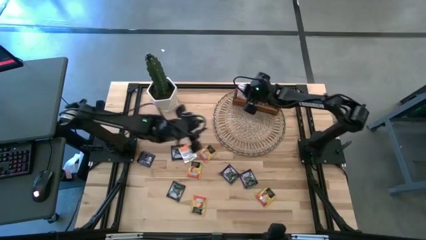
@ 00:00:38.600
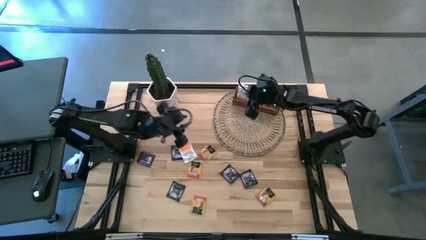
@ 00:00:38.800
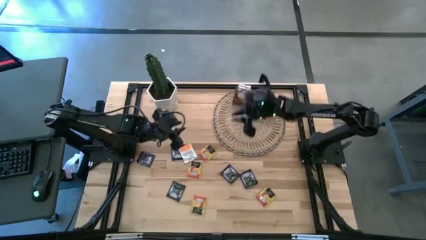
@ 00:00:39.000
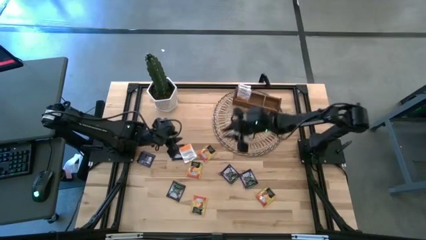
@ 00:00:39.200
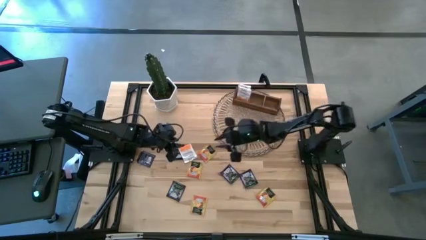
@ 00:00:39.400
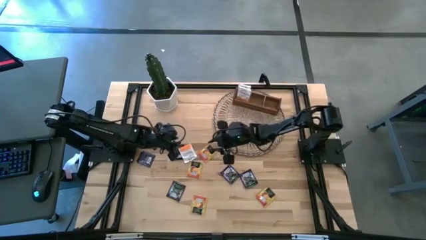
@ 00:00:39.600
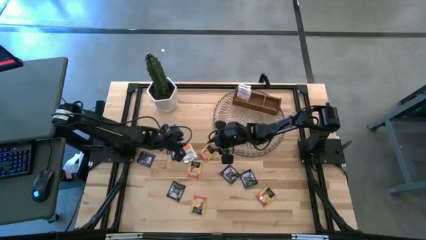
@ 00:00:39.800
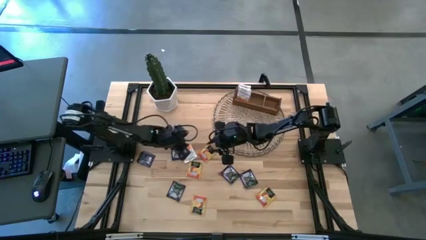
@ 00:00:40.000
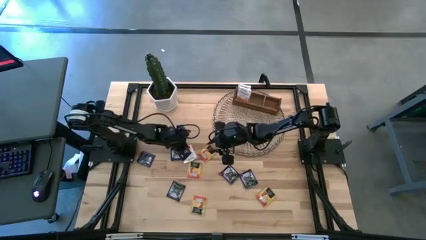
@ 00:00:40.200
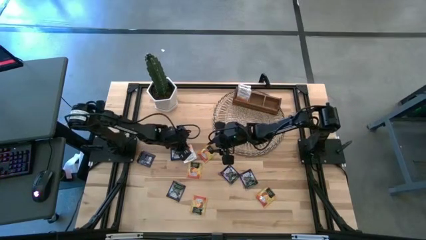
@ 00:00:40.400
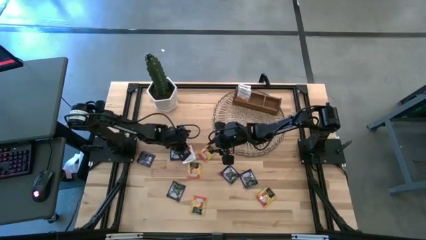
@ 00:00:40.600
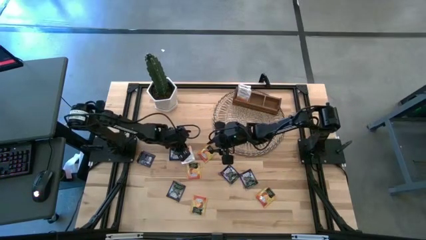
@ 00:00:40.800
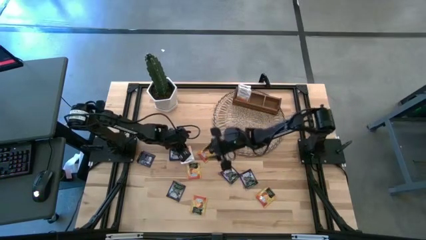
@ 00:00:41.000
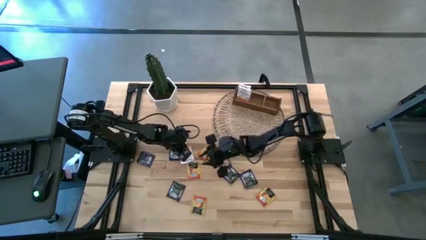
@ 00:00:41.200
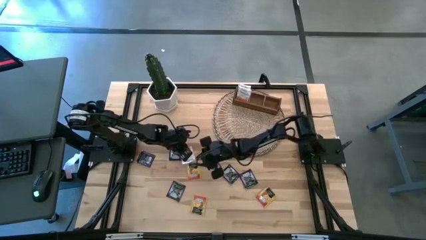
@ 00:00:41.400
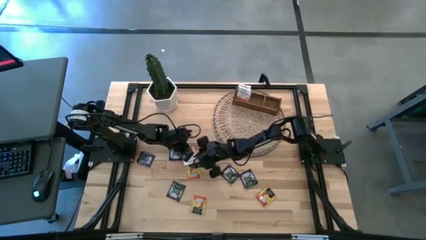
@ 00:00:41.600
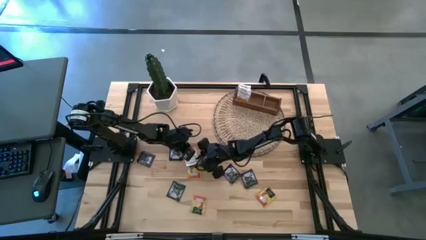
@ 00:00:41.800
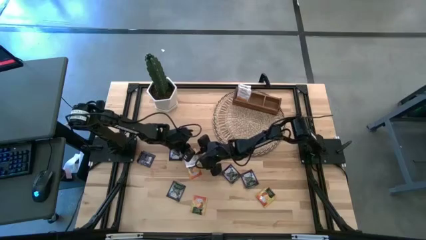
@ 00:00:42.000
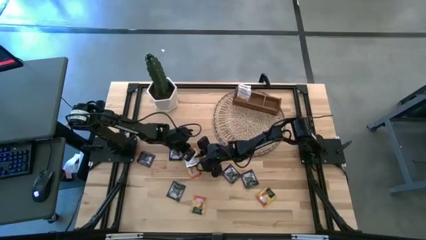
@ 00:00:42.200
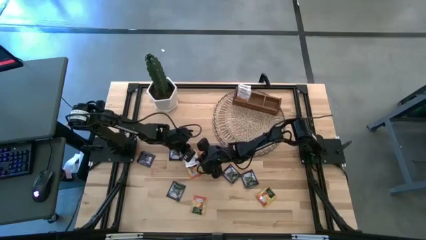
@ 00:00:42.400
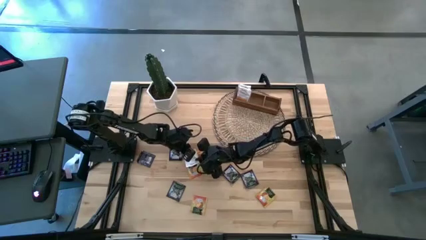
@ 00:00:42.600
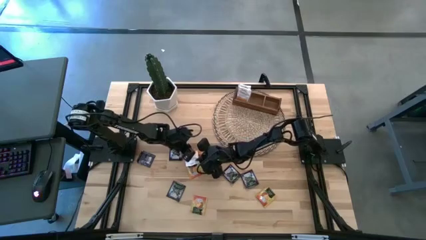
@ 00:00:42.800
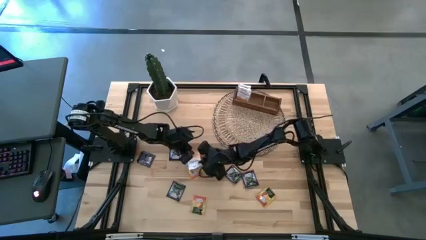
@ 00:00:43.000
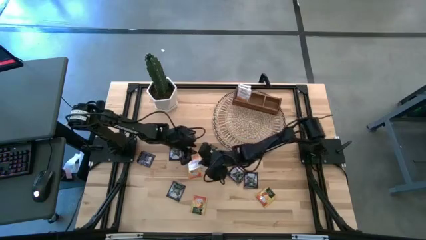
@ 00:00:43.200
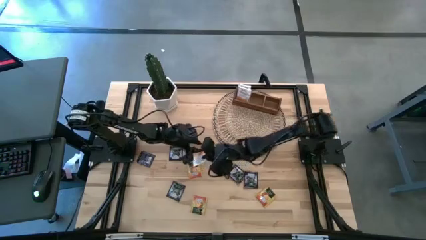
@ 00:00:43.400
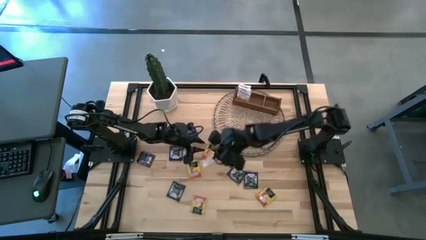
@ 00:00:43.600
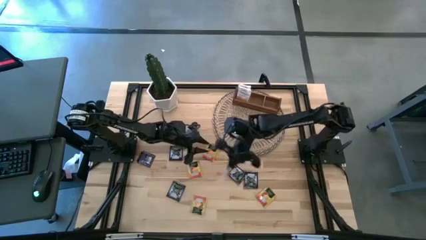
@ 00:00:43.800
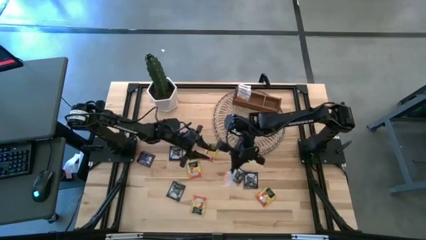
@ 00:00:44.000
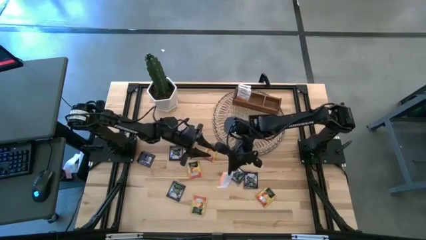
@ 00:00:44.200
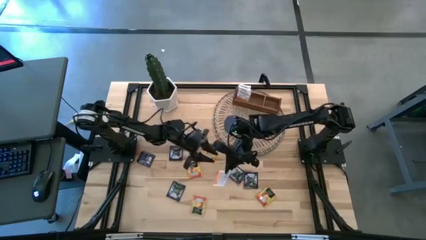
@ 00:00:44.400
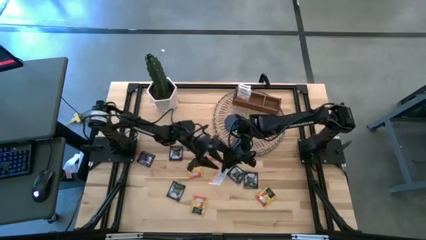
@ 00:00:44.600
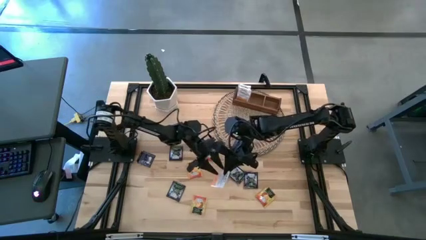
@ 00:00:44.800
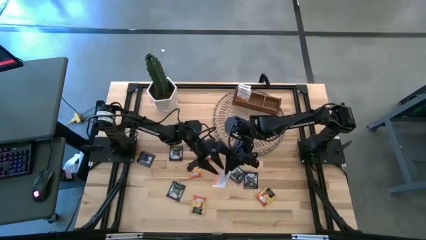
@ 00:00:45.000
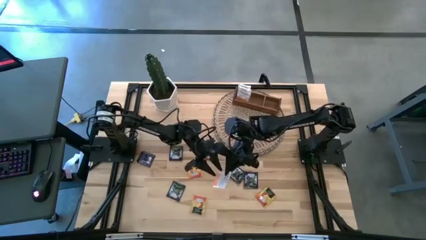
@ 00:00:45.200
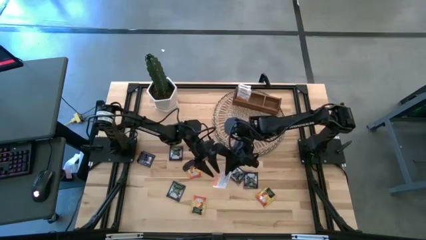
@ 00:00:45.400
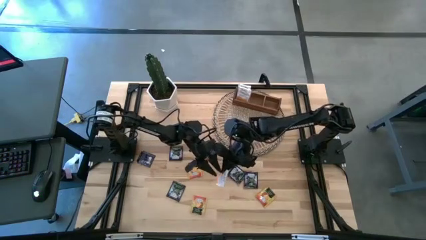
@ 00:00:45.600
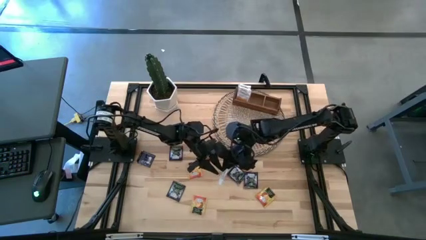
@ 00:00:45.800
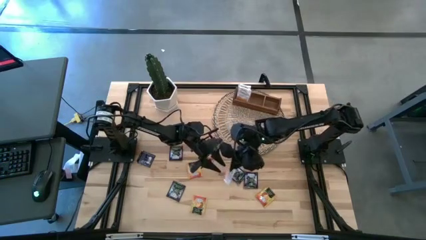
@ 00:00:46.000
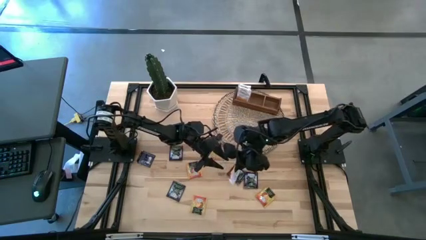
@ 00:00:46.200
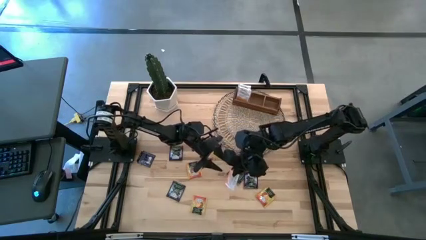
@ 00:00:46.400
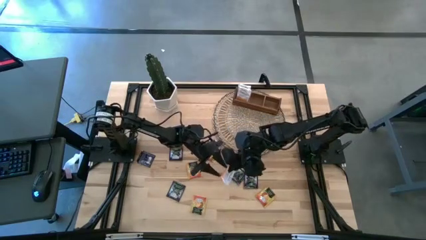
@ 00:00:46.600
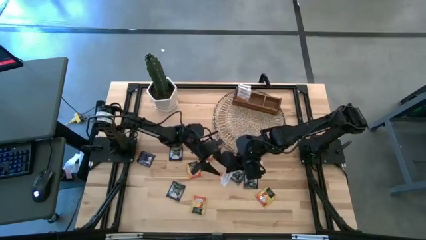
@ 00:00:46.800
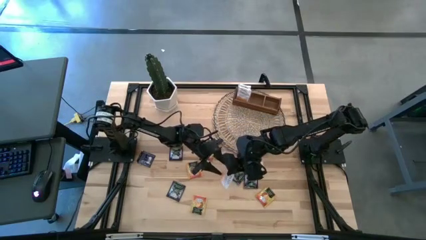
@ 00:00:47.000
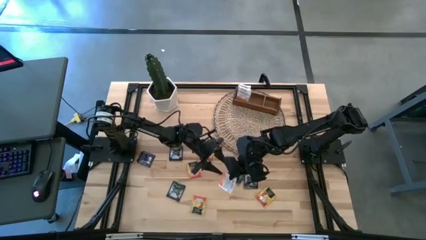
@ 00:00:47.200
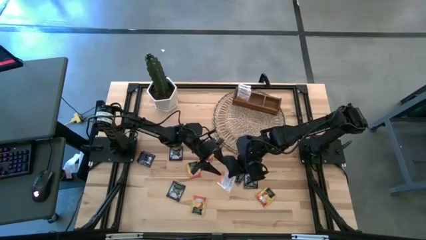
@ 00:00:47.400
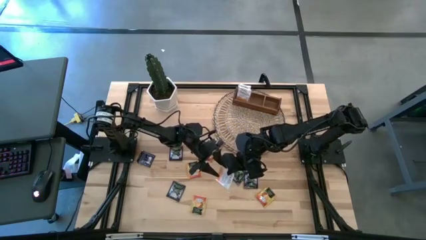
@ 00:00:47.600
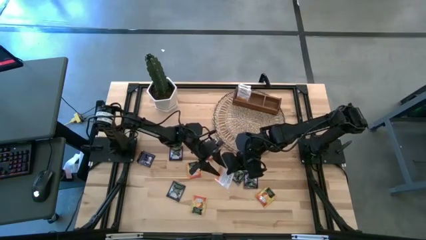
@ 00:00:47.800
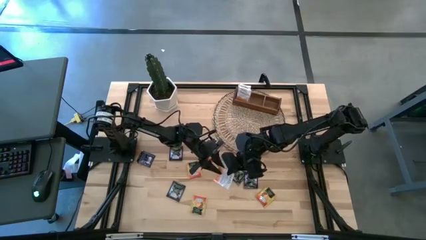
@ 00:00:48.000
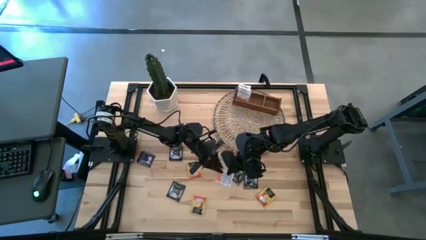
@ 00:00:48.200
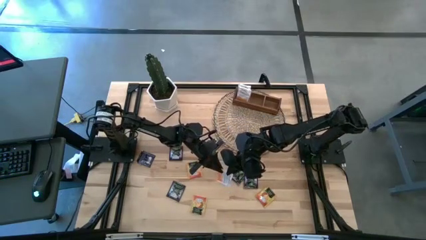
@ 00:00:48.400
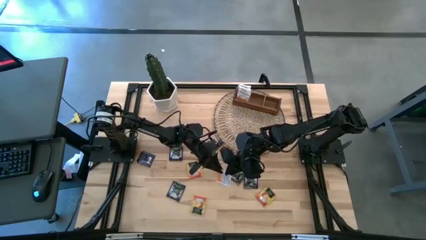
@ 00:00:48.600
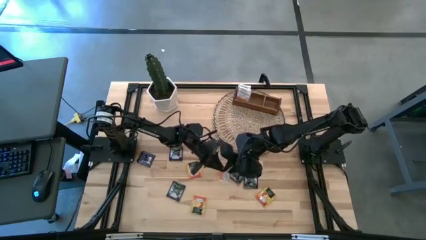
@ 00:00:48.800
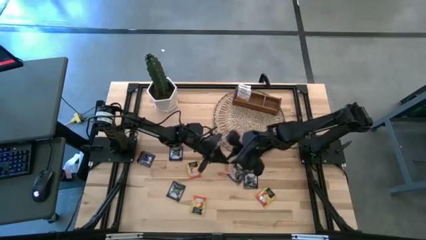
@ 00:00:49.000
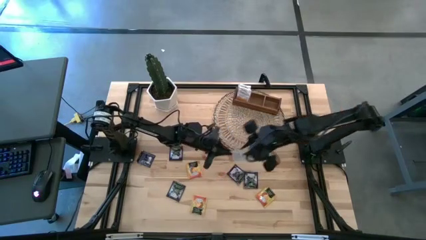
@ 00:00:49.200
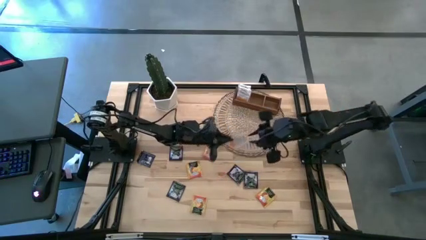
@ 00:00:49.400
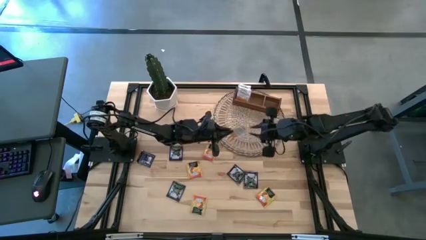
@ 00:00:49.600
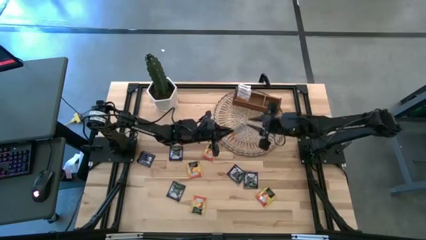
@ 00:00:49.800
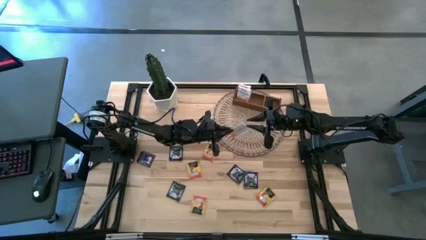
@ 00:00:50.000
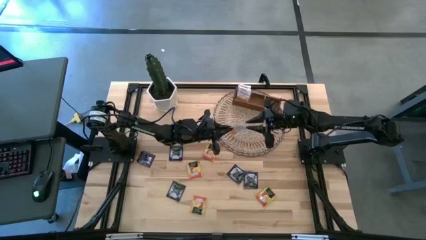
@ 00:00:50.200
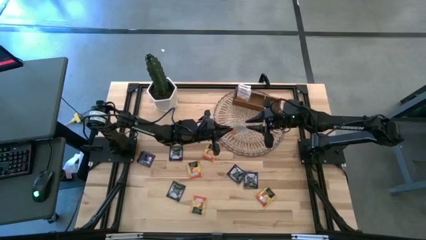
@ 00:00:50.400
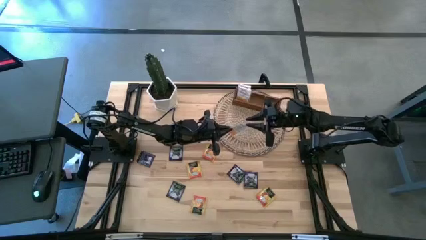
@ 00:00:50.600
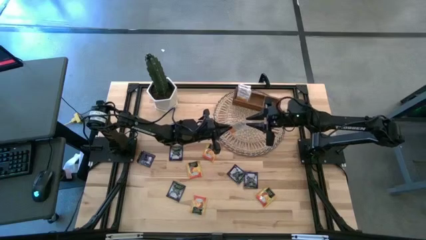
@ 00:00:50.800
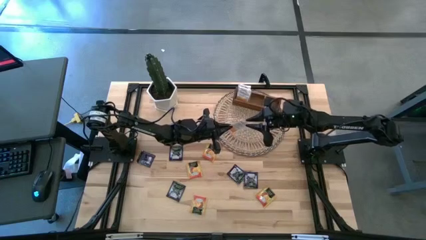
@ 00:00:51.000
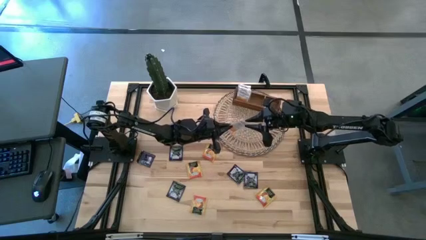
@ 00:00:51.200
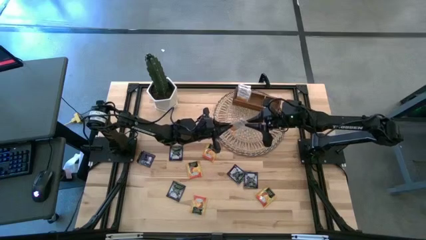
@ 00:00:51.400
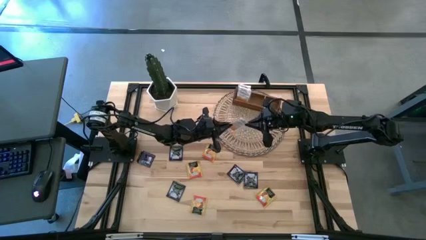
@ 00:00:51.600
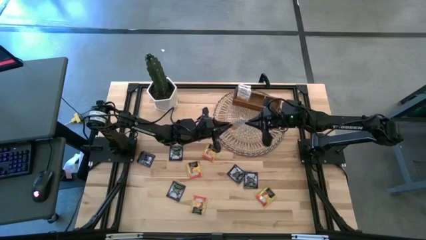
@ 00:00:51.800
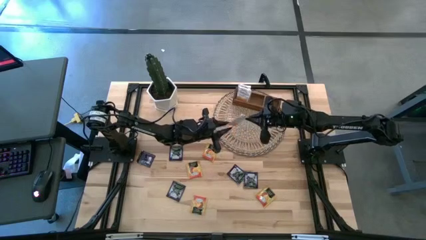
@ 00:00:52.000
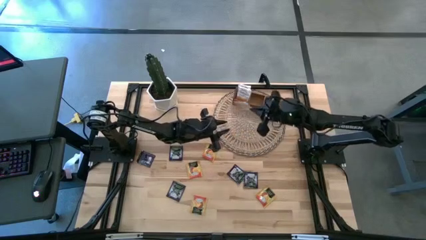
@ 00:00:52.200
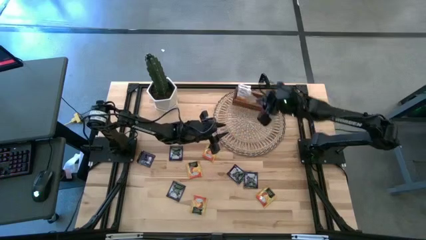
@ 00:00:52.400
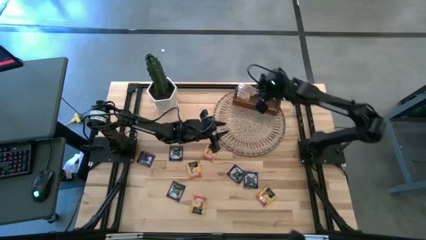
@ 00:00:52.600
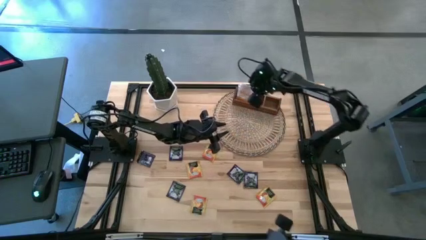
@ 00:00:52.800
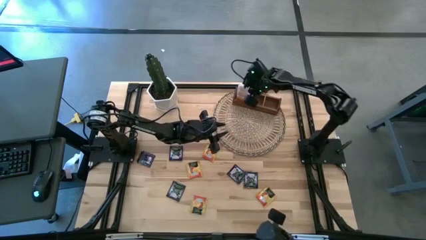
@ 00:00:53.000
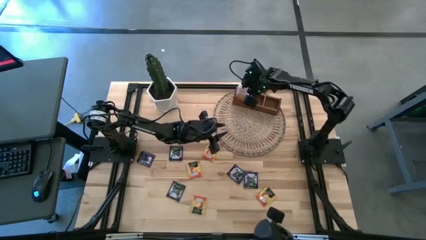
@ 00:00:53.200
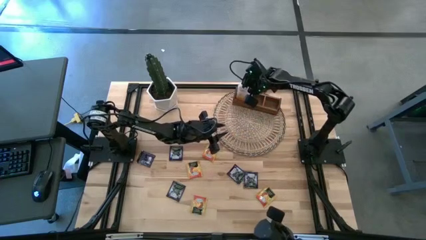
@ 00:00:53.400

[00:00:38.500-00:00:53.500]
Task: Pick & Place Tea
Put the orange tea bag into the left section of the wooden organizer
